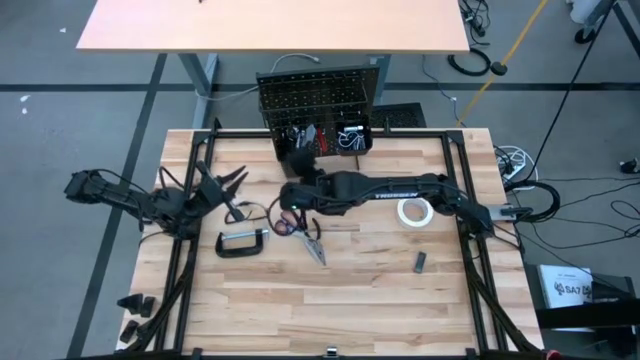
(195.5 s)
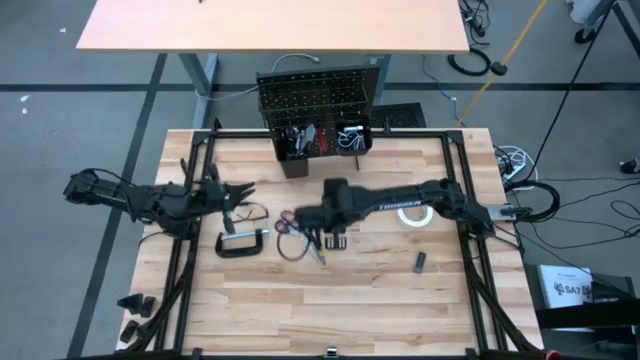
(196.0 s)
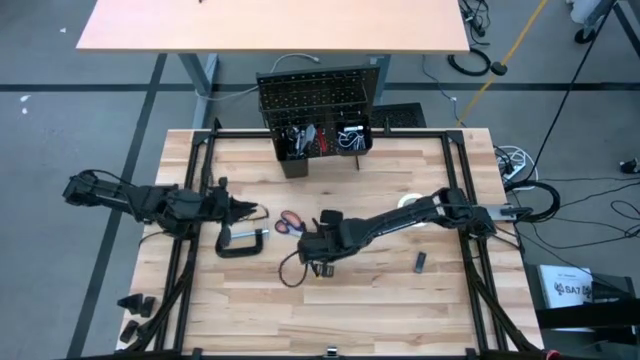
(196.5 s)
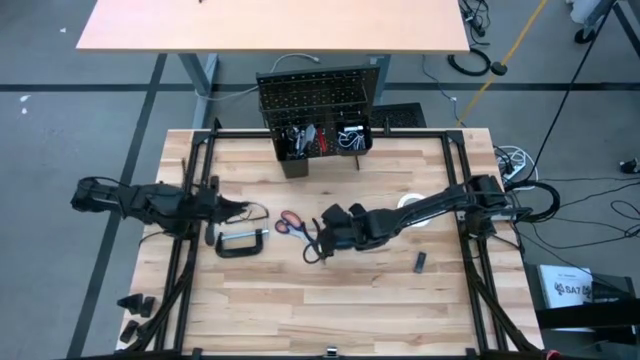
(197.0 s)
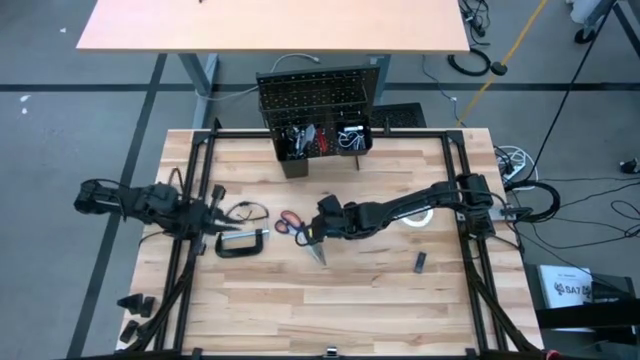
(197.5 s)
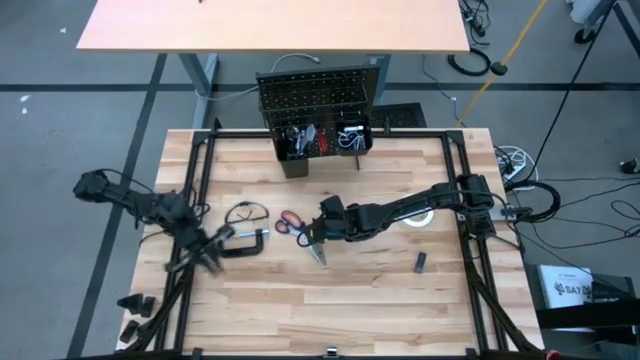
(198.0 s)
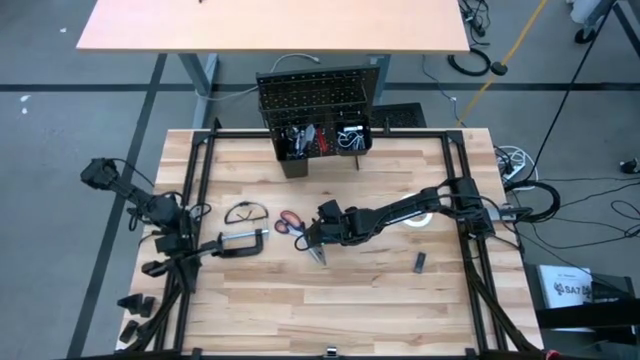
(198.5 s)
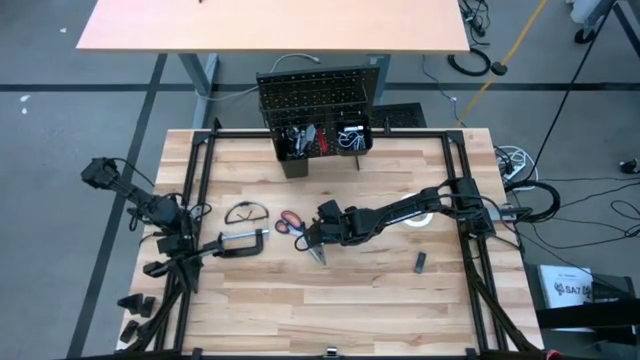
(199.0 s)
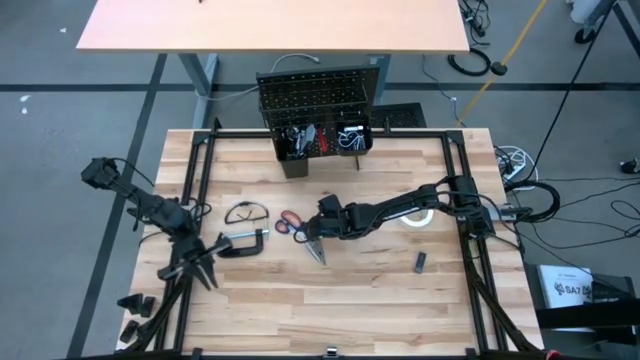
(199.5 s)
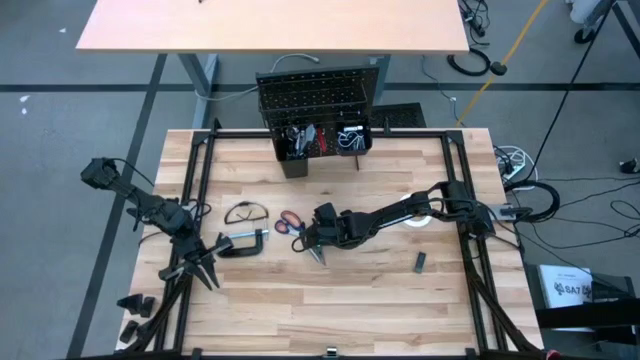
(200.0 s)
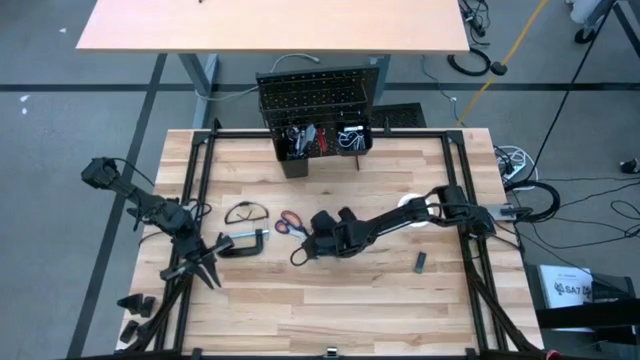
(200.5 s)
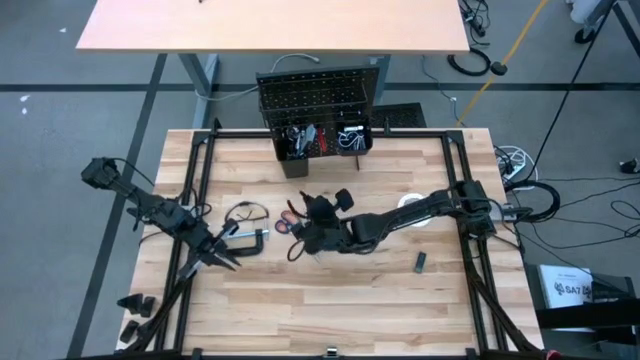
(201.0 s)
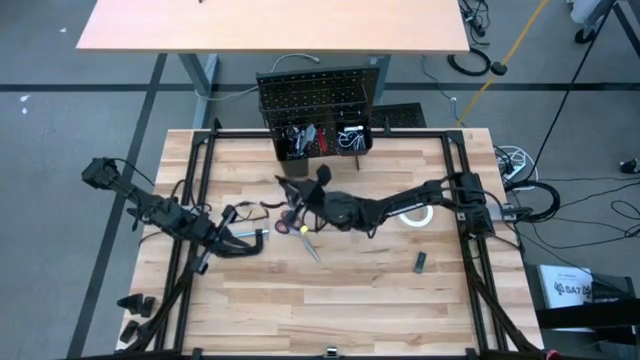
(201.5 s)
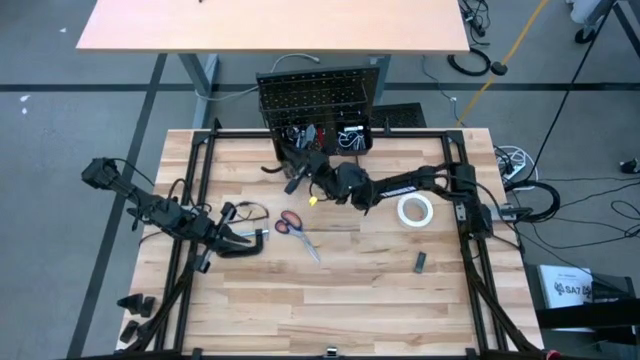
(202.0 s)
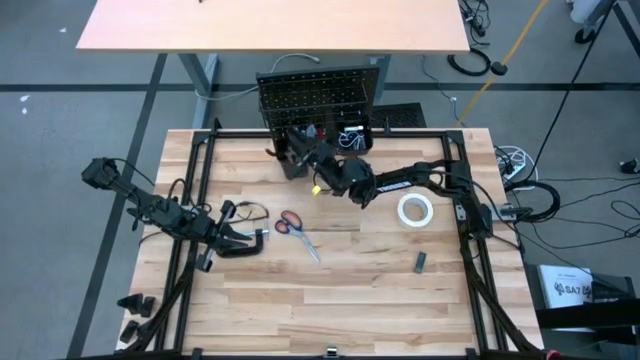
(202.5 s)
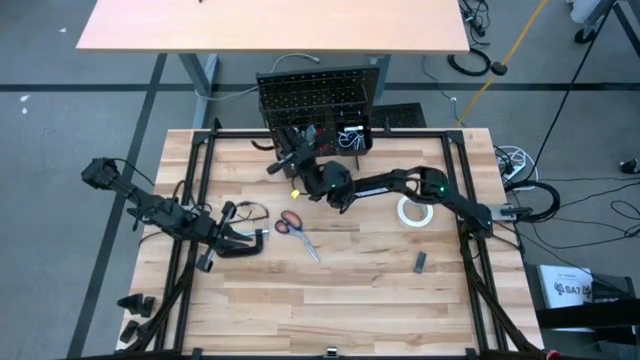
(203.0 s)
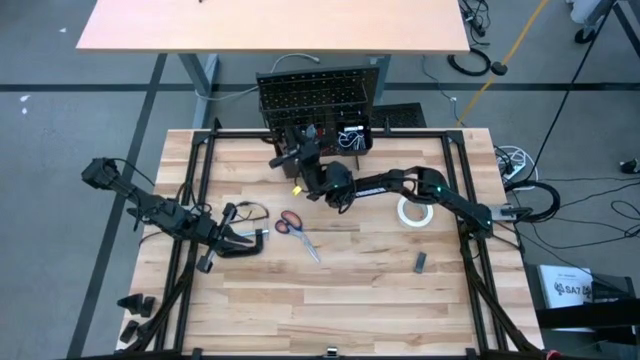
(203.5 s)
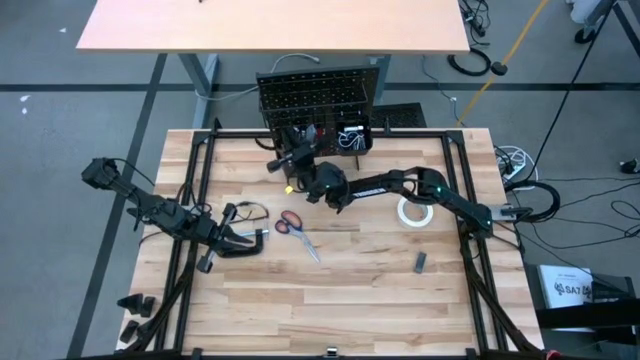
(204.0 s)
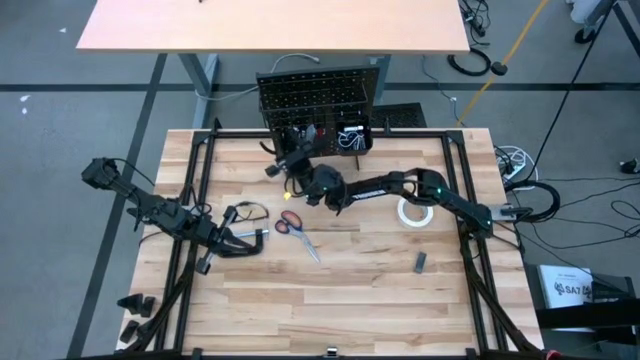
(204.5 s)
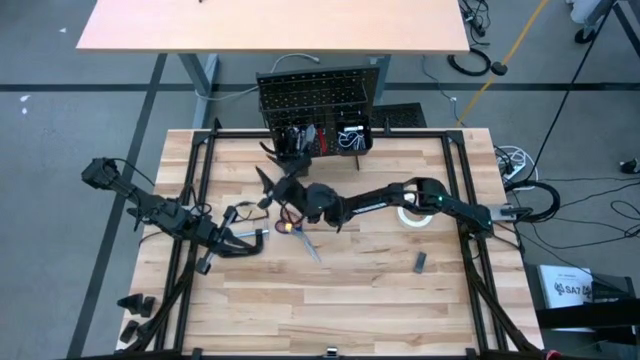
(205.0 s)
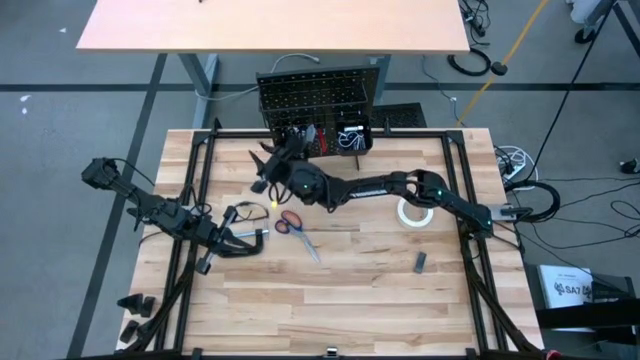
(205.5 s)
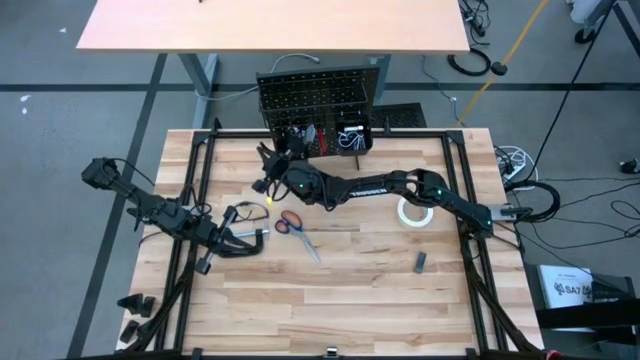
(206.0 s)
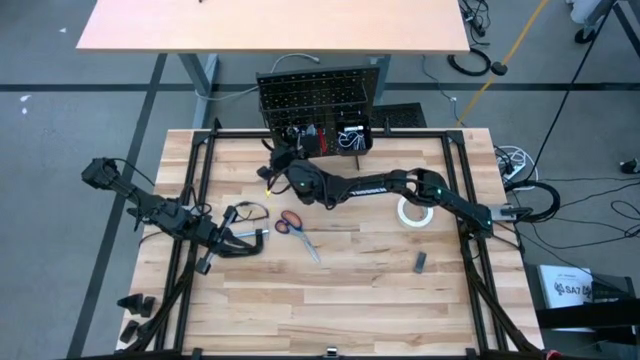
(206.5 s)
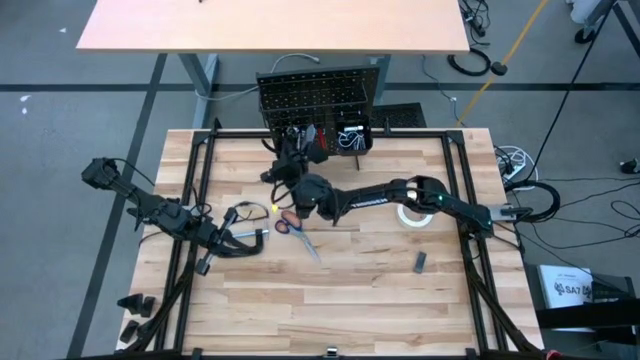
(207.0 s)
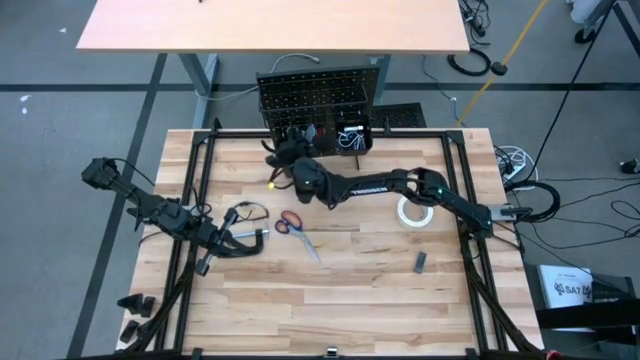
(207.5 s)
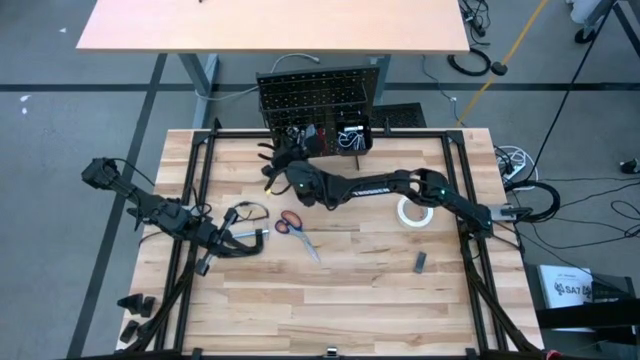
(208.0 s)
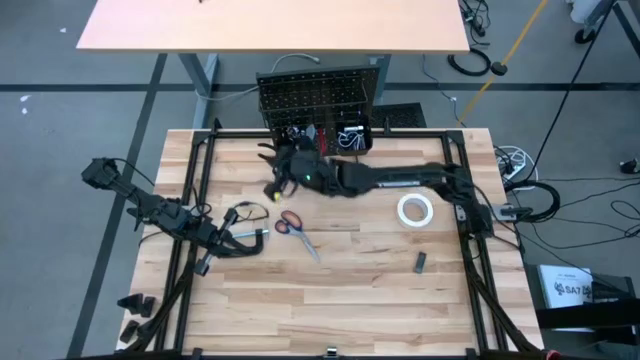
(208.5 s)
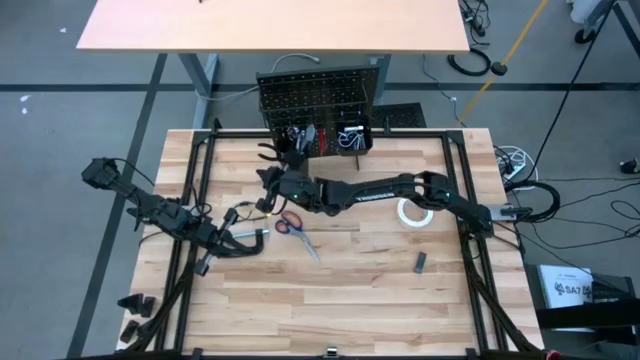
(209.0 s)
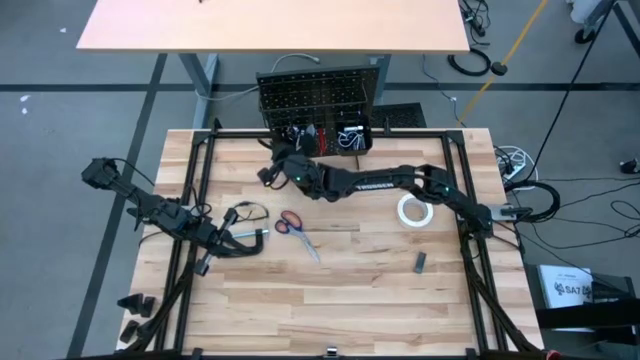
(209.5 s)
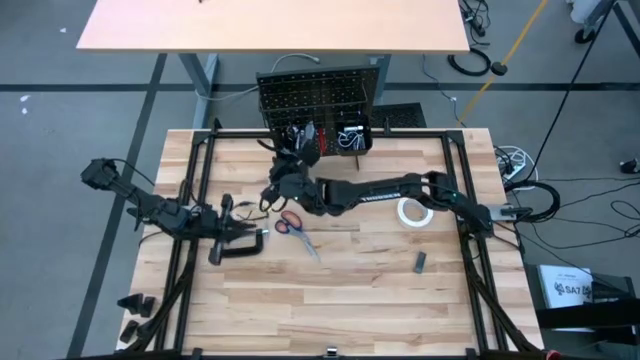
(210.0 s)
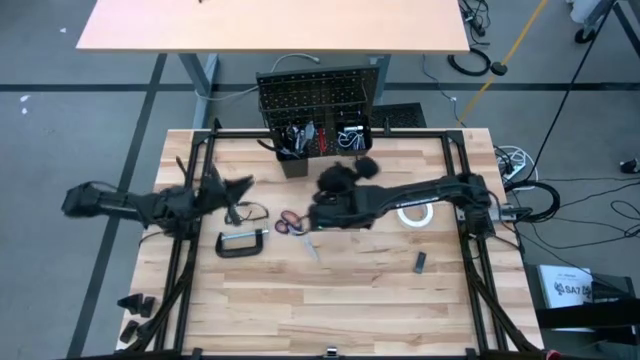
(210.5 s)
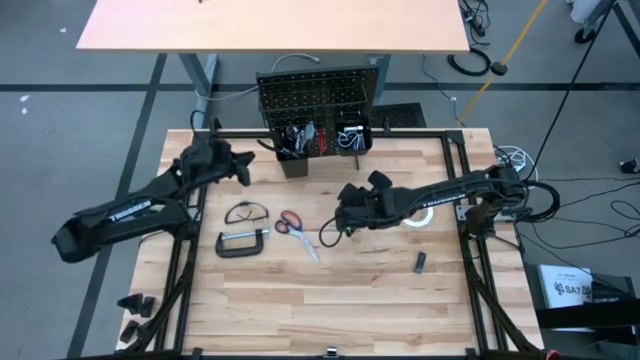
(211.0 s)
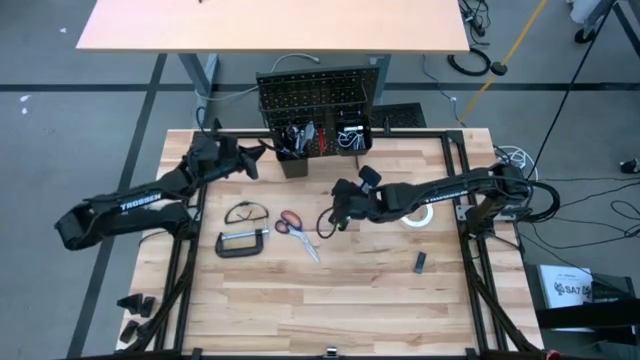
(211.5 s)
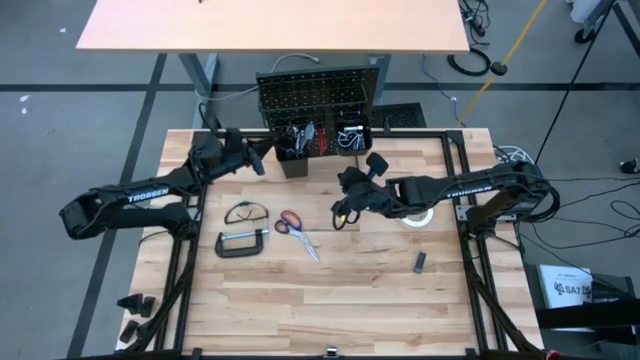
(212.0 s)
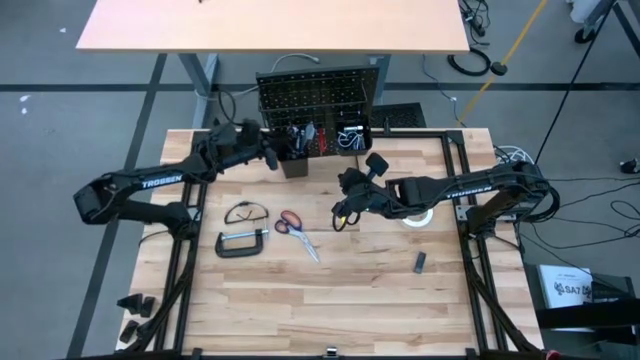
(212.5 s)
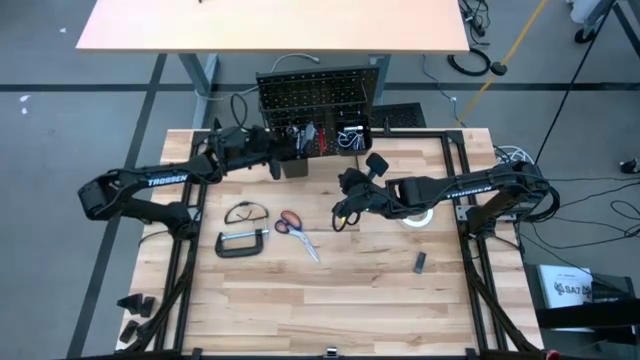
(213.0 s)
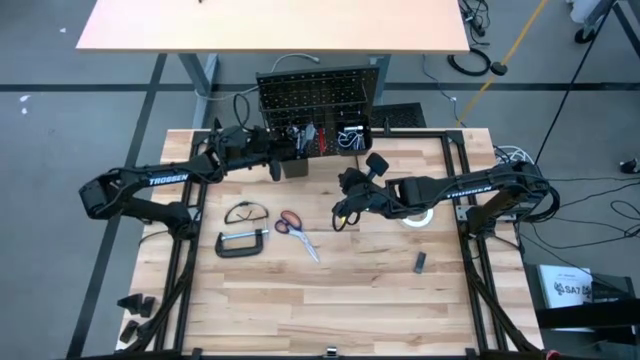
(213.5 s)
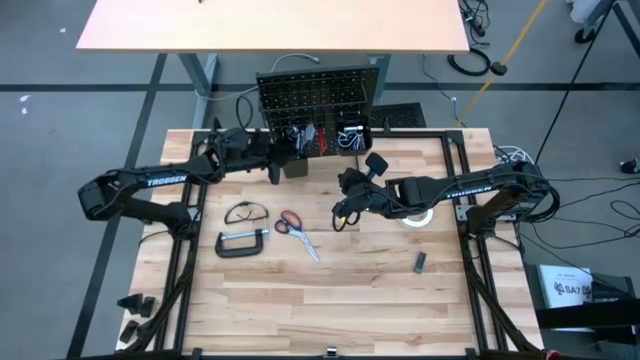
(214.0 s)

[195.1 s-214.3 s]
Task: Hang tools onto peg board
Put the long nose pliers on the left black bin on the peg board

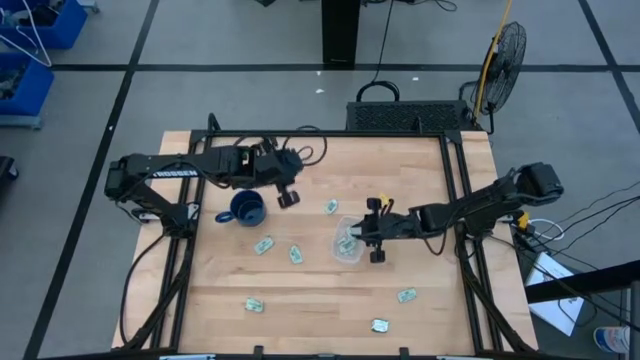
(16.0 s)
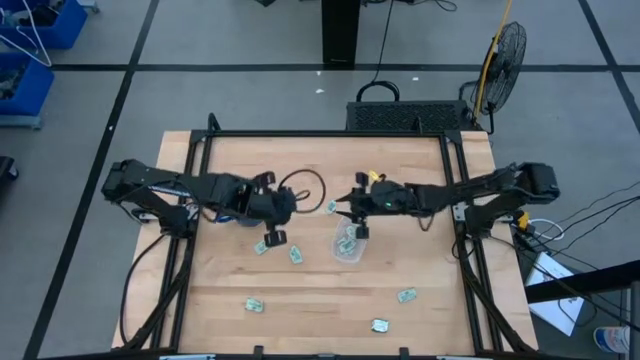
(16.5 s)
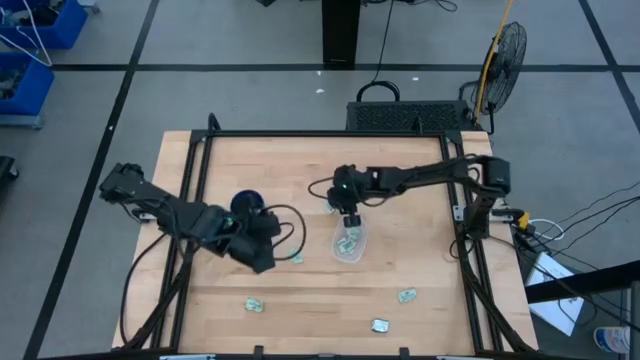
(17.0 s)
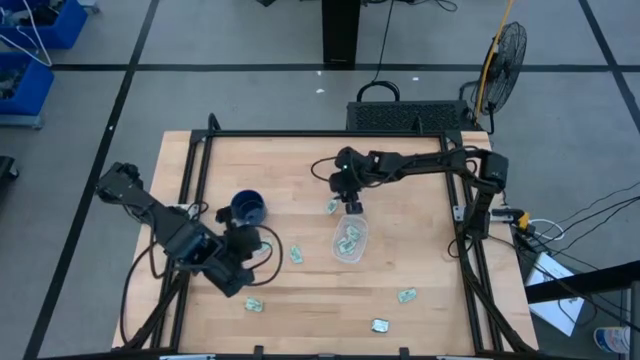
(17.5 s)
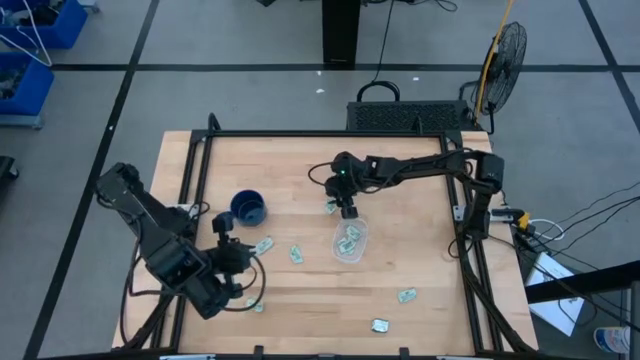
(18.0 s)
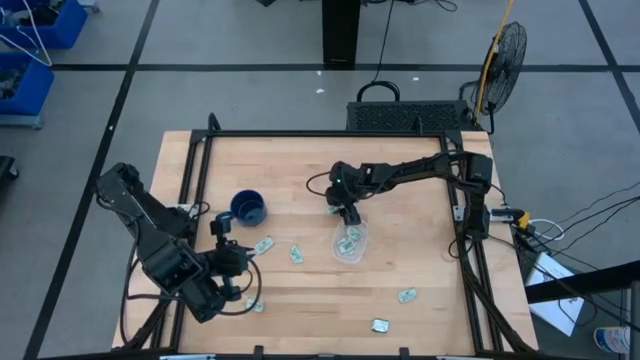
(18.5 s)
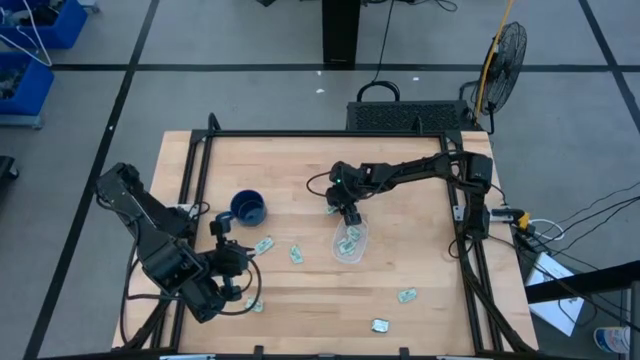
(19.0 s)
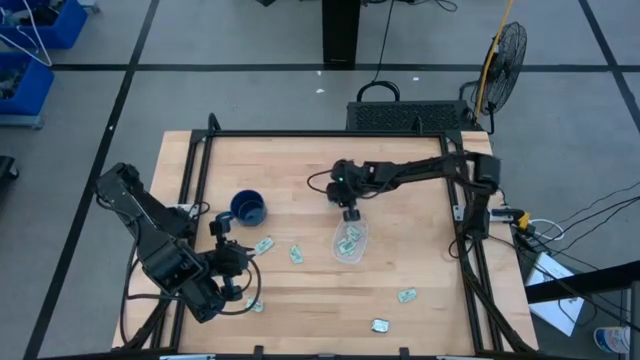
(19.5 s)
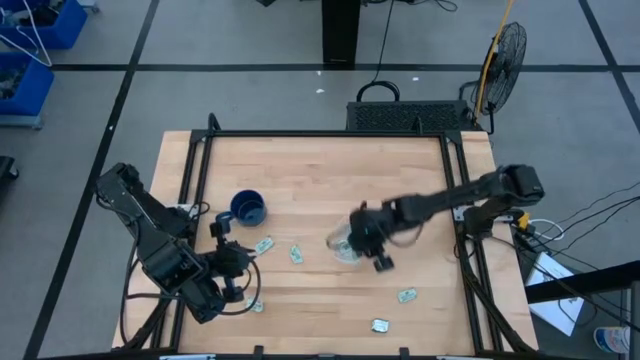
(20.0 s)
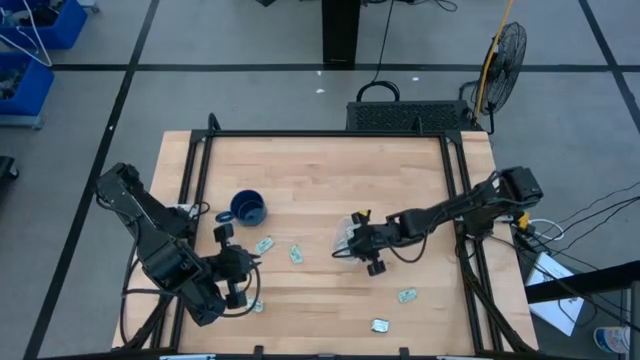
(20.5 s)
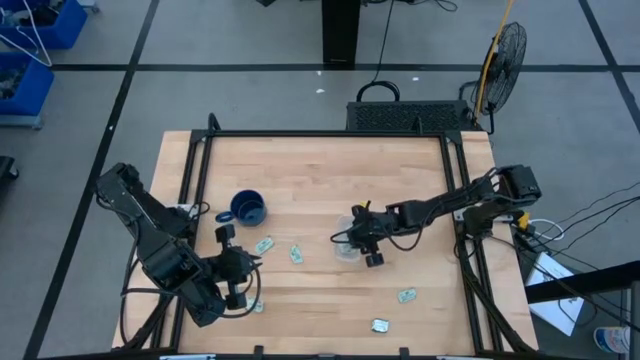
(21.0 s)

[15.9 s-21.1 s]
Task: Pick and place Stevia / Truvia into bins
Put the stevia packet into the transparent container
